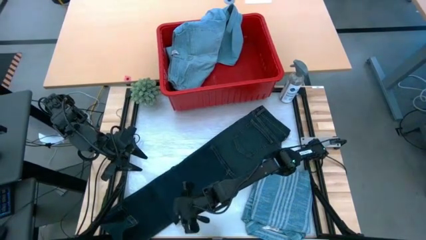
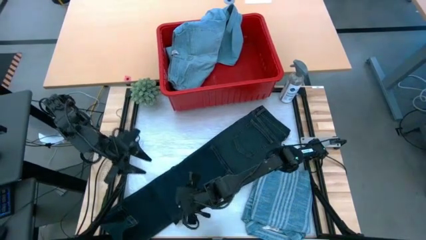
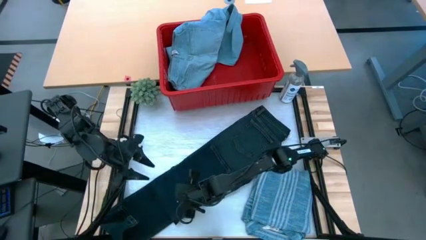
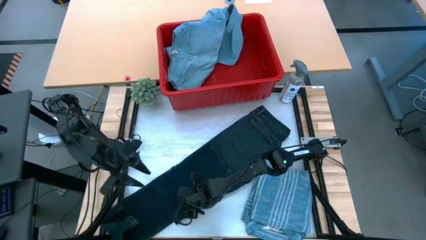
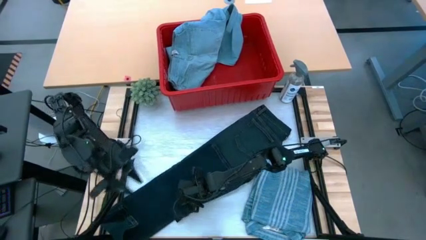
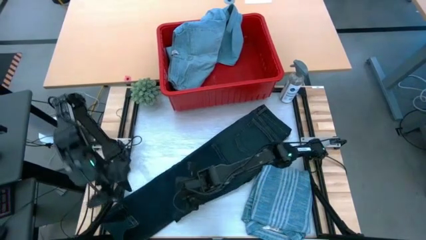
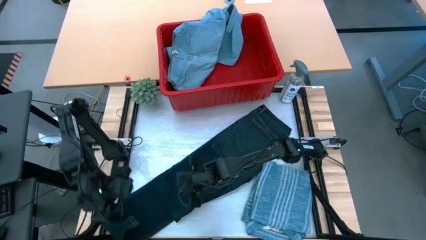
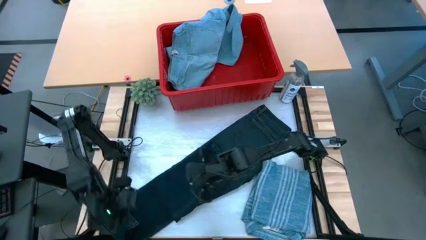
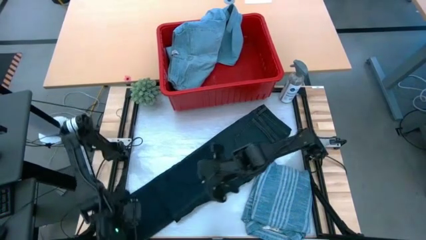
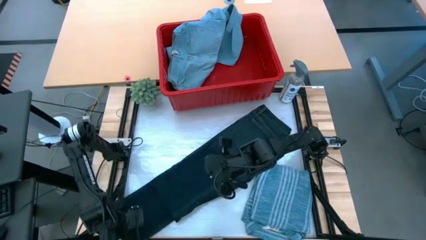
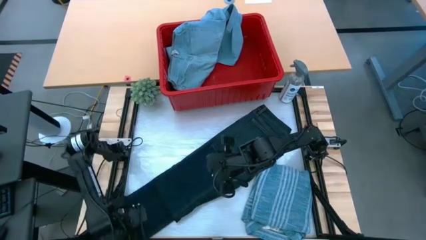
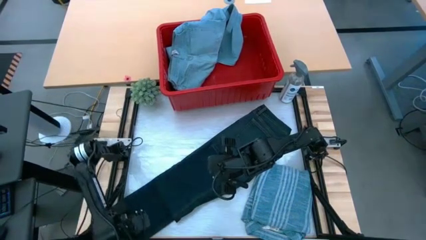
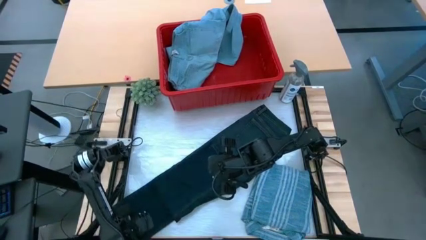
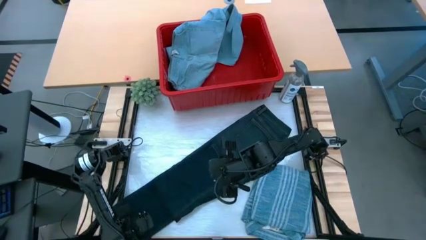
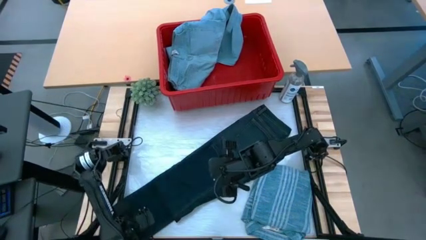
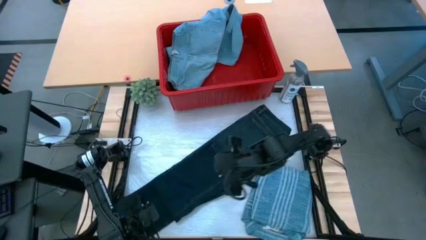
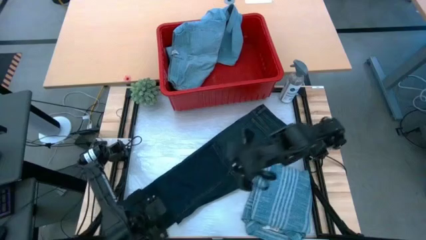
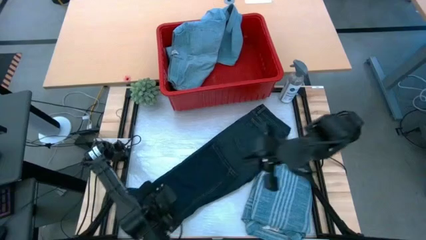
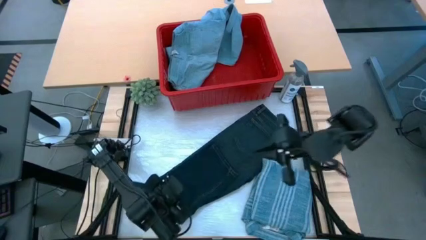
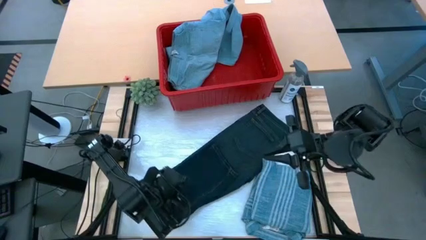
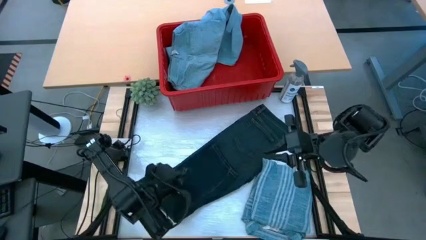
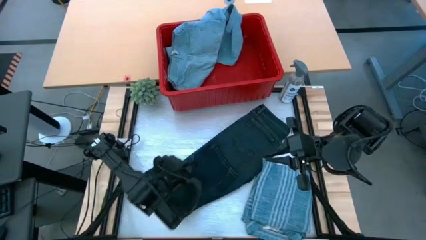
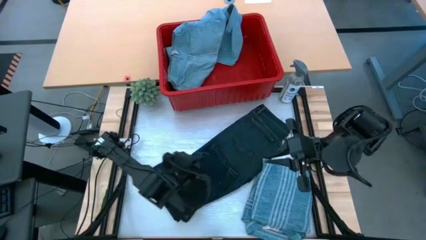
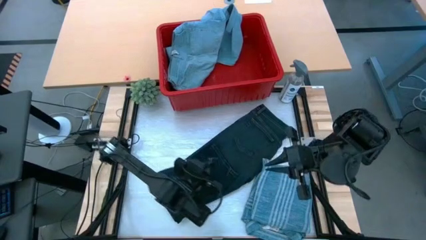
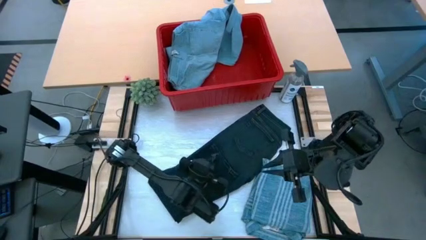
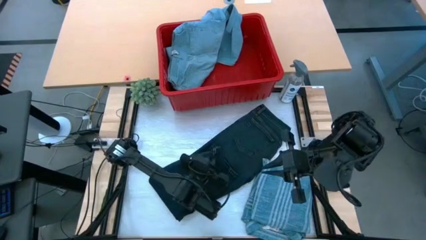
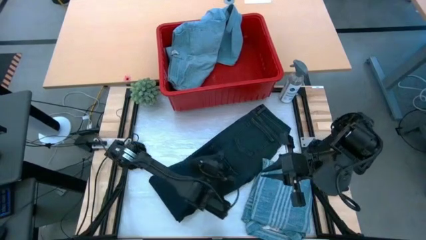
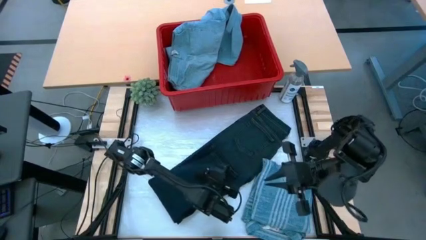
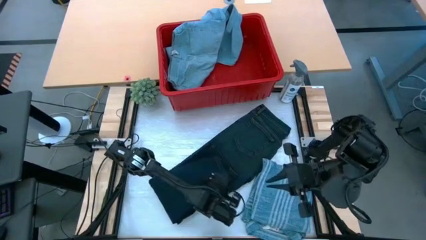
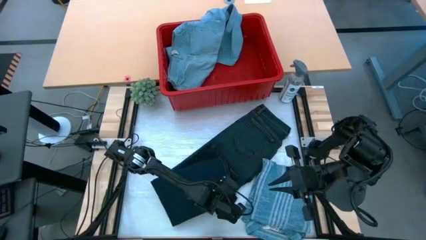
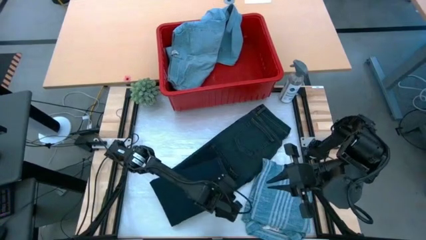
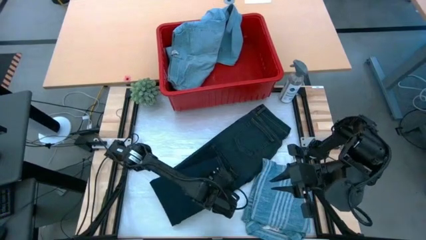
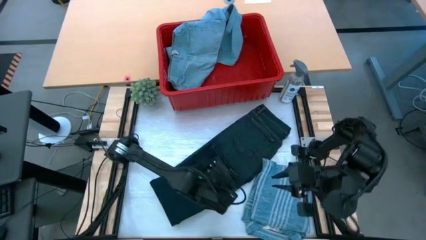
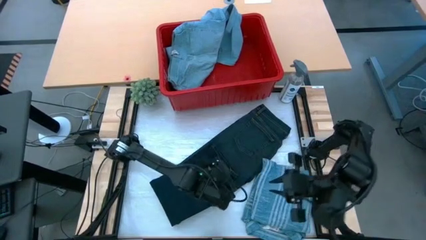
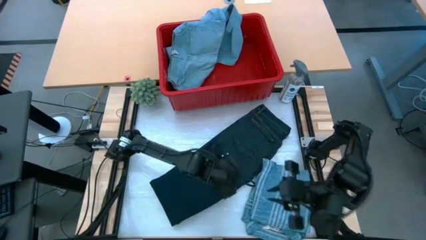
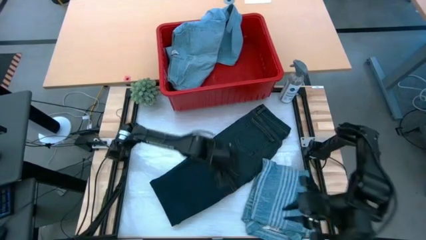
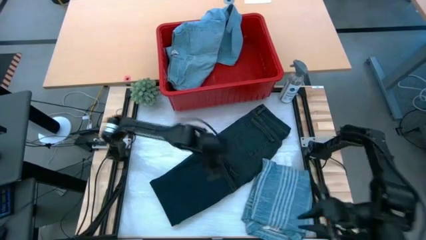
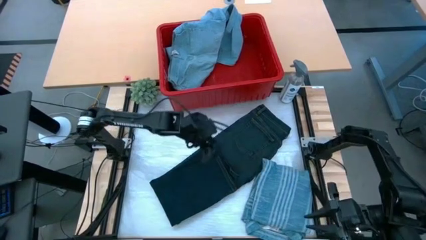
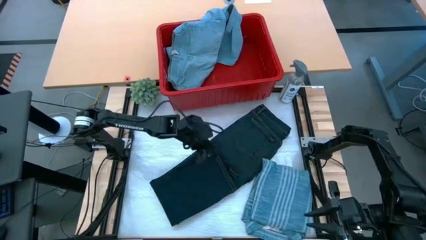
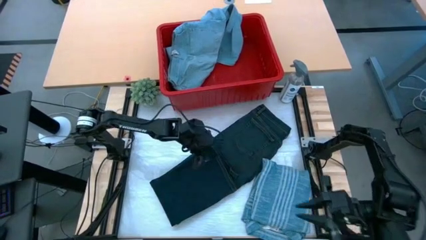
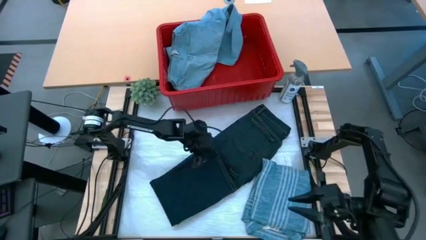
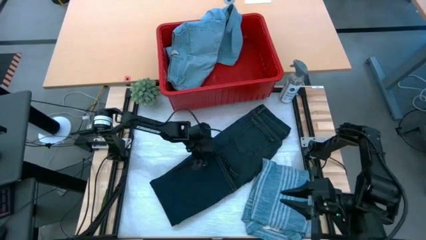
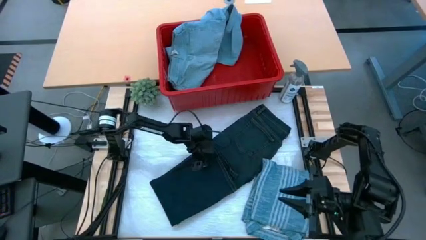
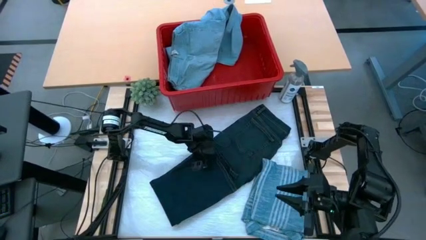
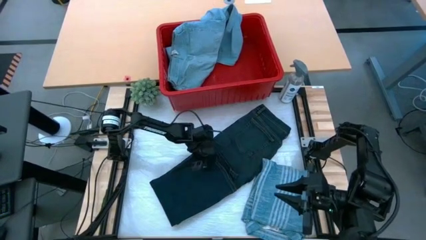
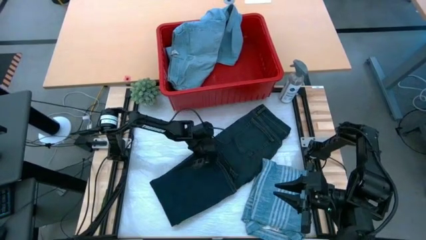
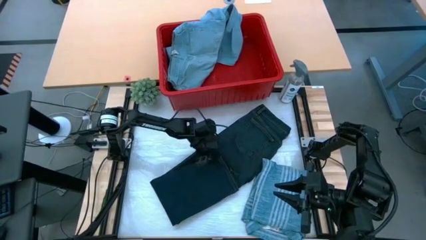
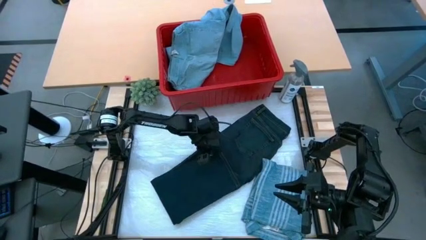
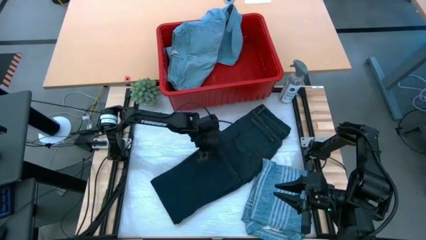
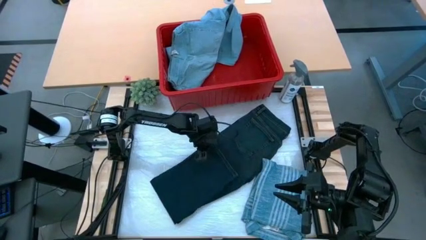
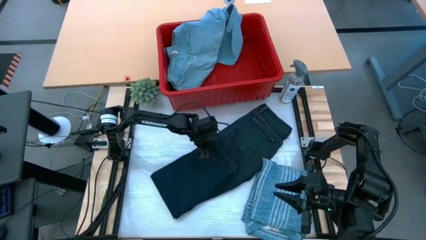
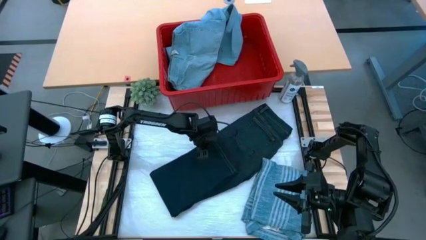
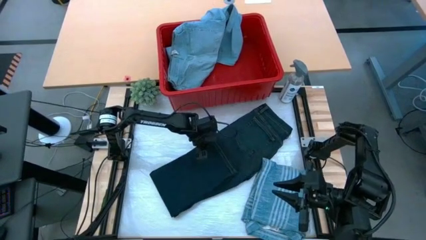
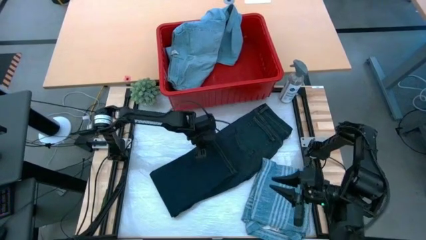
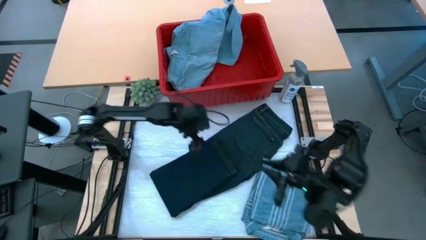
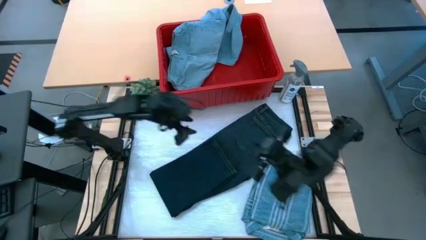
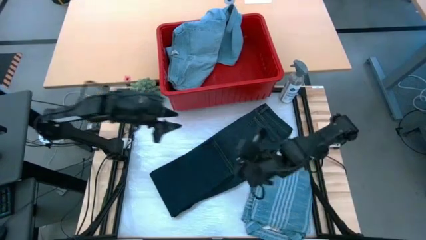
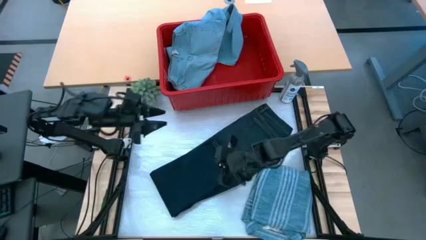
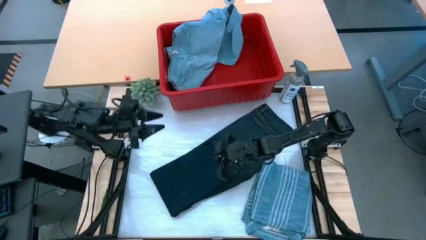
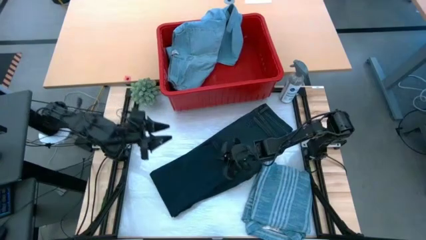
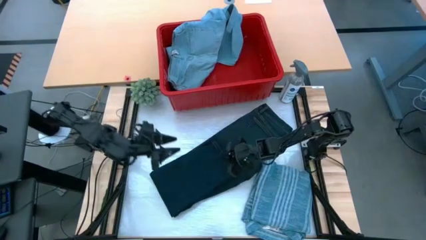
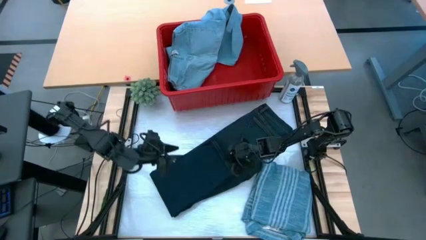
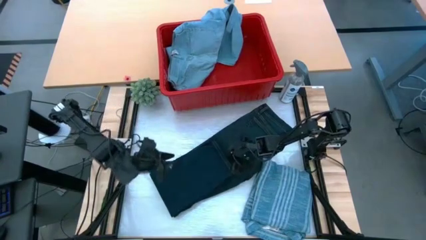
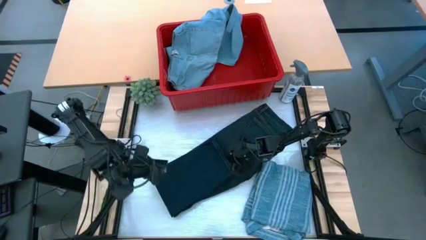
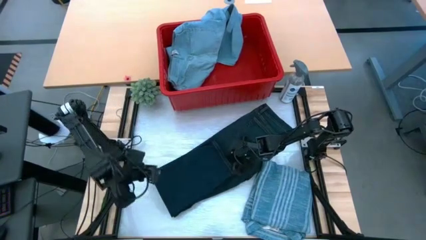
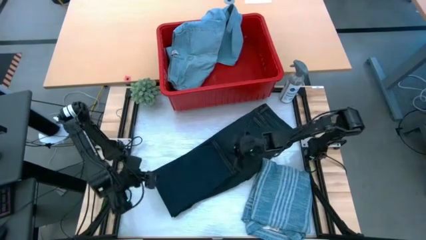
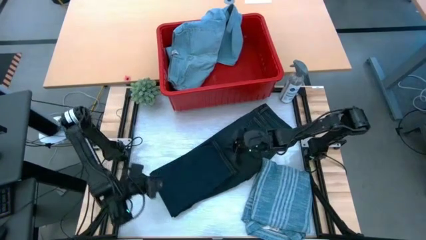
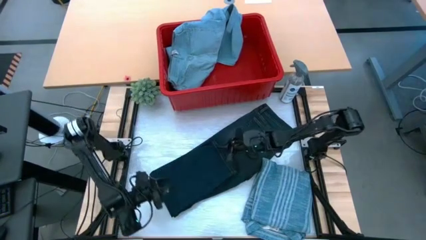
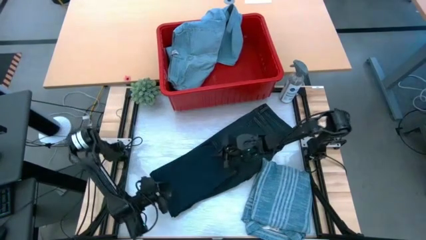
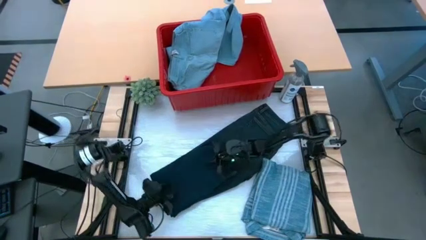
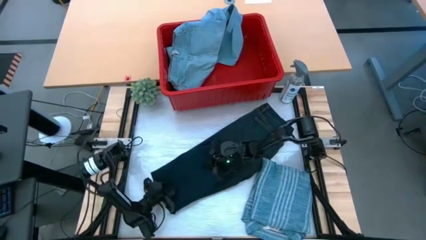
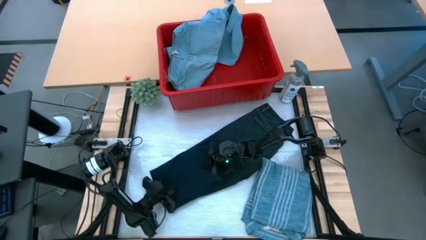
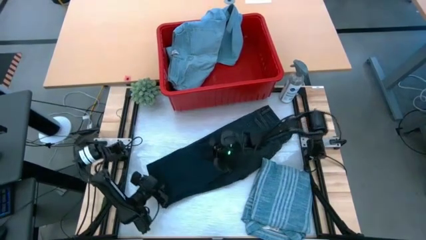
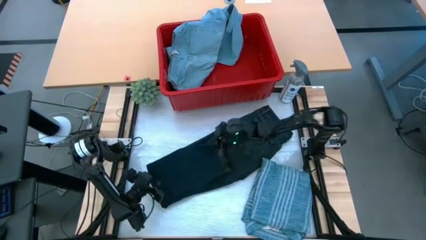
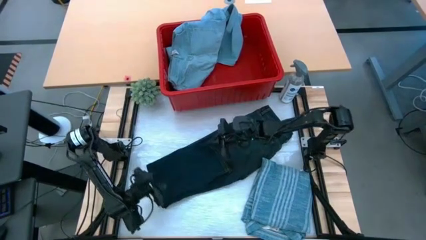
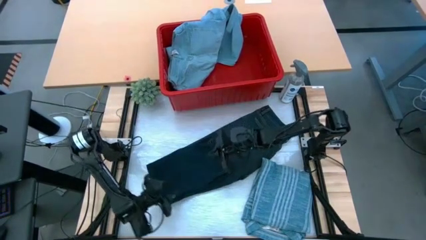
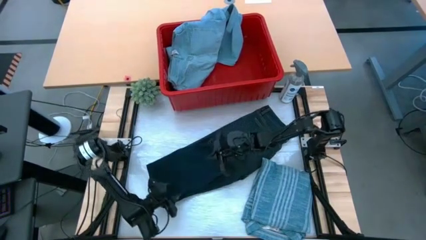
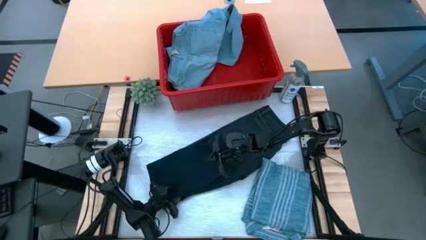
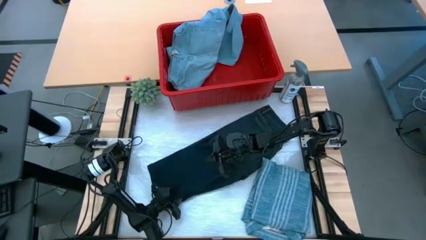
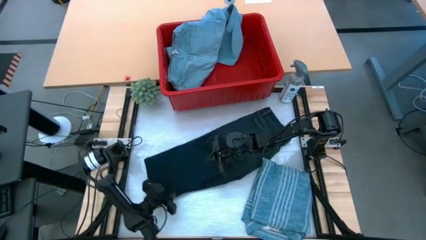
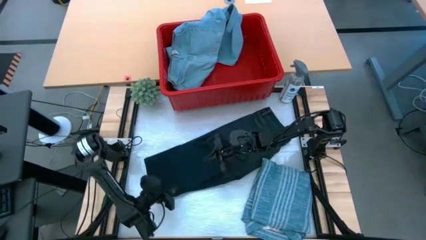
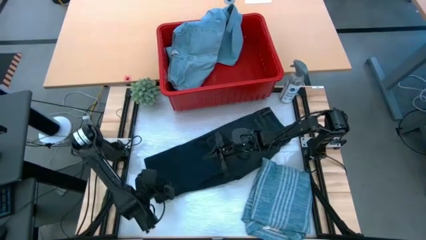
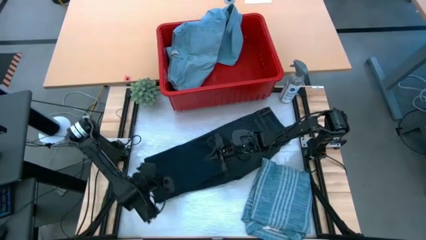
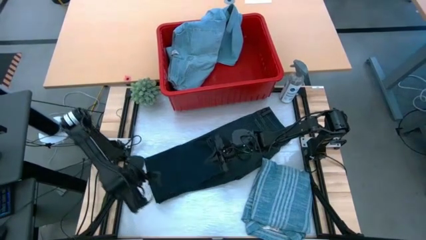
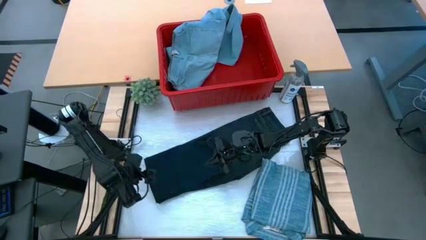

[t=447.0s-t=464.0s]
Task: Fold Laundry from Bin
Fold the blue denim pants
